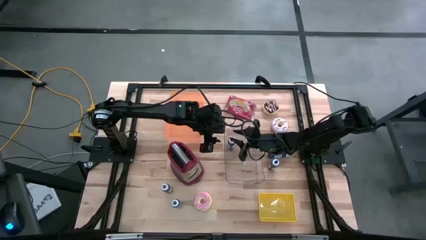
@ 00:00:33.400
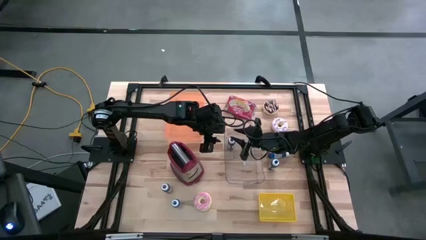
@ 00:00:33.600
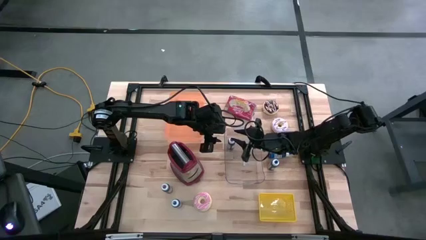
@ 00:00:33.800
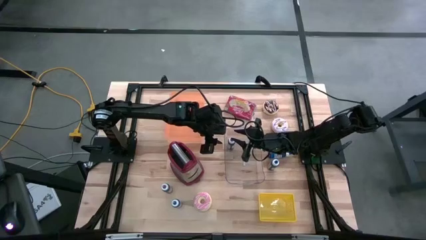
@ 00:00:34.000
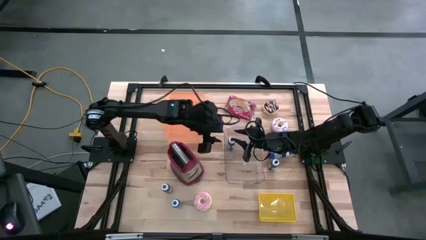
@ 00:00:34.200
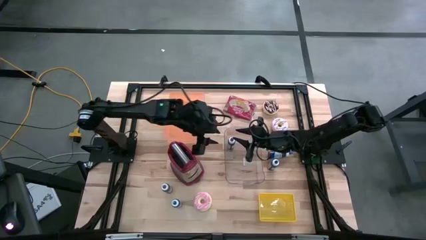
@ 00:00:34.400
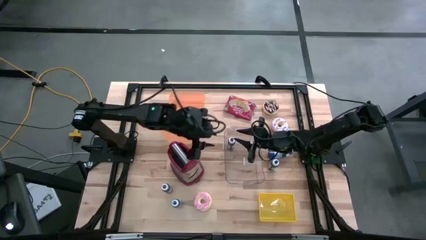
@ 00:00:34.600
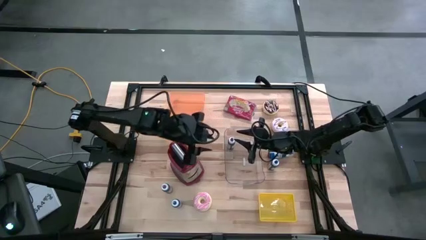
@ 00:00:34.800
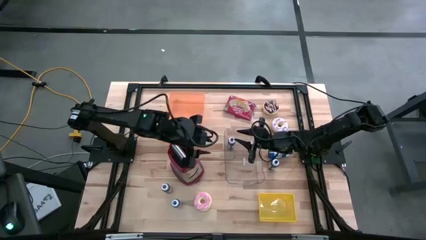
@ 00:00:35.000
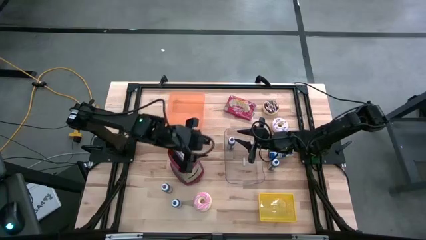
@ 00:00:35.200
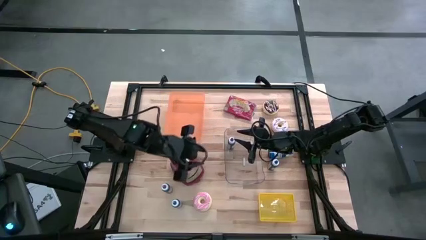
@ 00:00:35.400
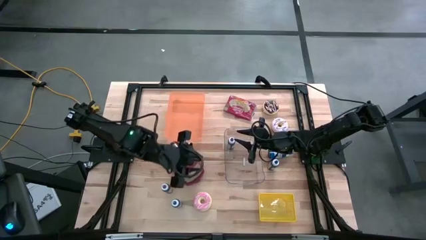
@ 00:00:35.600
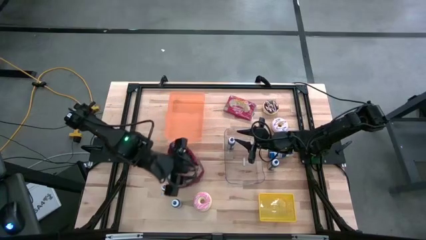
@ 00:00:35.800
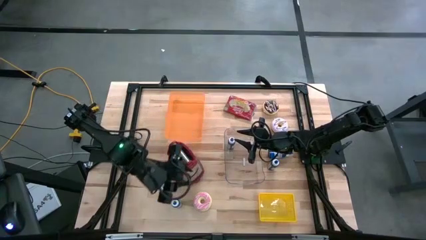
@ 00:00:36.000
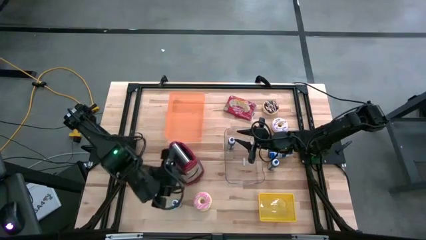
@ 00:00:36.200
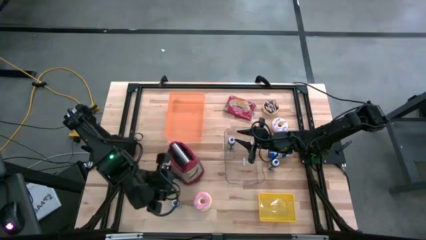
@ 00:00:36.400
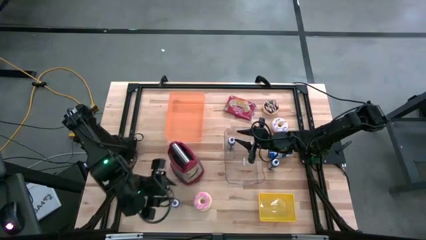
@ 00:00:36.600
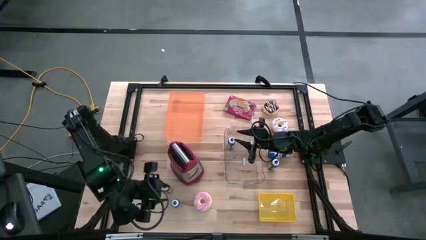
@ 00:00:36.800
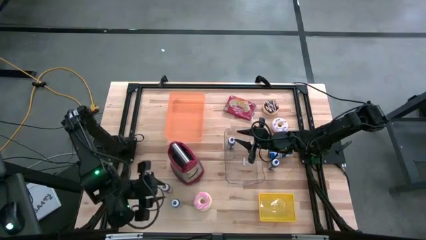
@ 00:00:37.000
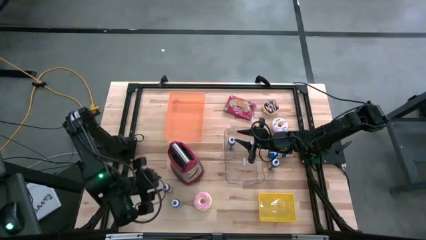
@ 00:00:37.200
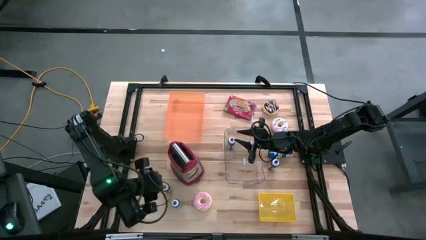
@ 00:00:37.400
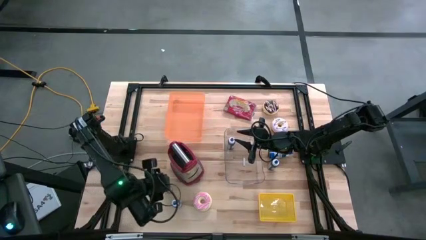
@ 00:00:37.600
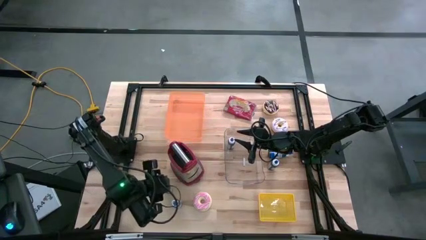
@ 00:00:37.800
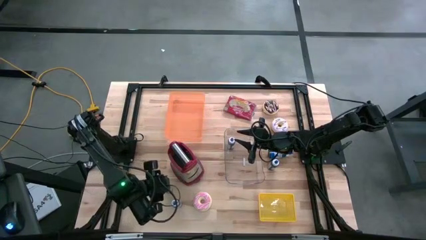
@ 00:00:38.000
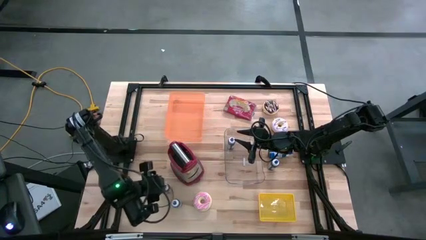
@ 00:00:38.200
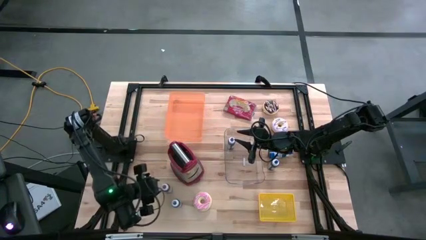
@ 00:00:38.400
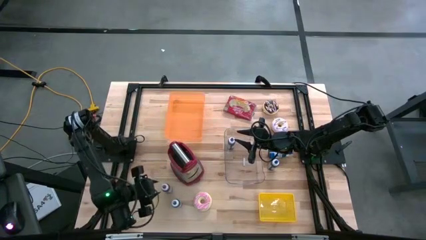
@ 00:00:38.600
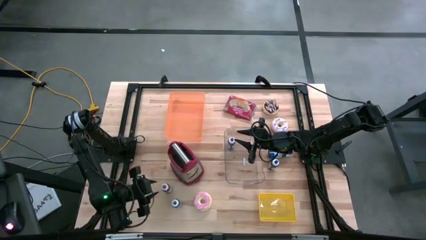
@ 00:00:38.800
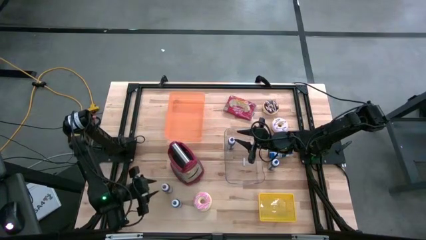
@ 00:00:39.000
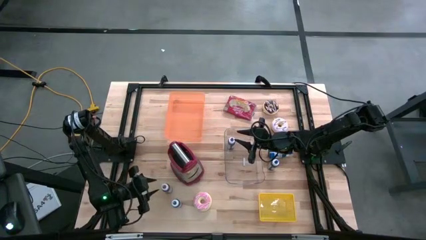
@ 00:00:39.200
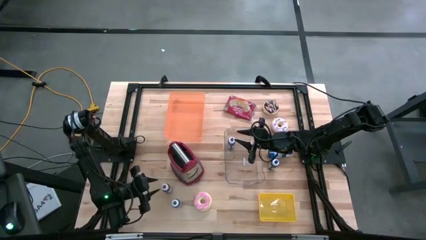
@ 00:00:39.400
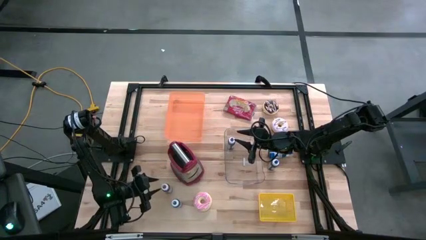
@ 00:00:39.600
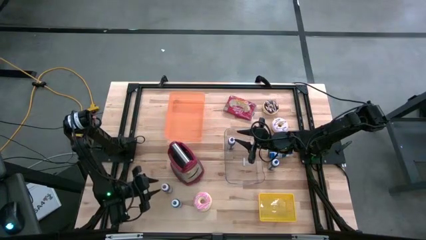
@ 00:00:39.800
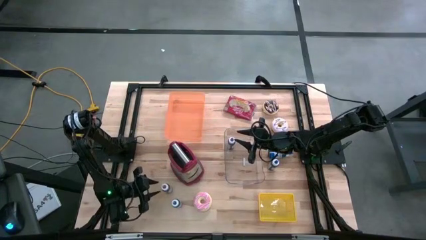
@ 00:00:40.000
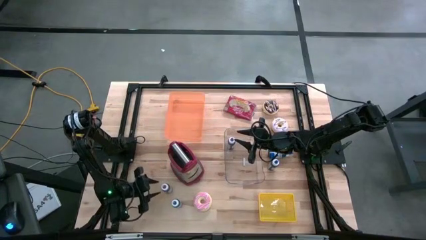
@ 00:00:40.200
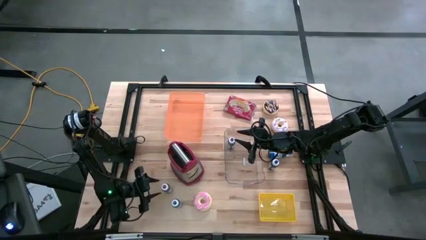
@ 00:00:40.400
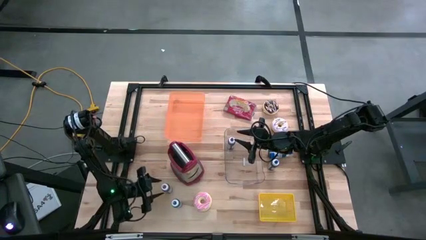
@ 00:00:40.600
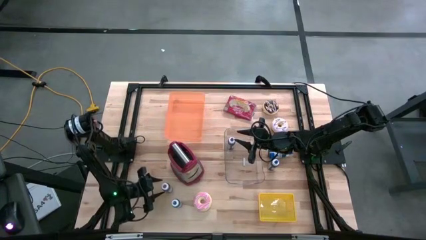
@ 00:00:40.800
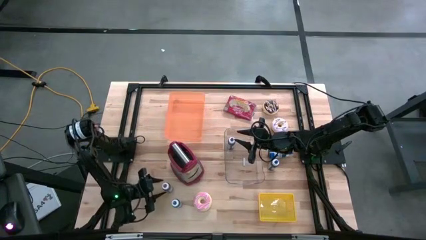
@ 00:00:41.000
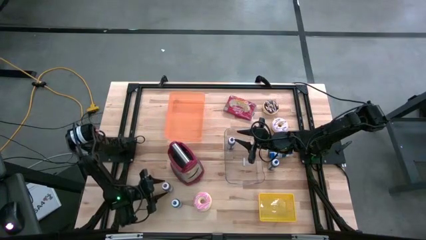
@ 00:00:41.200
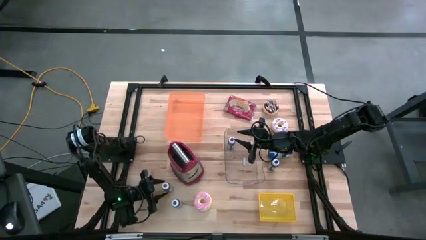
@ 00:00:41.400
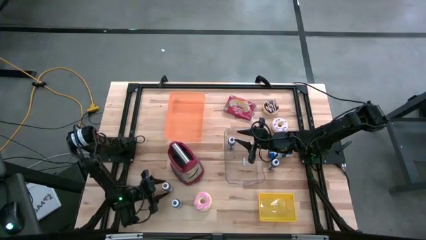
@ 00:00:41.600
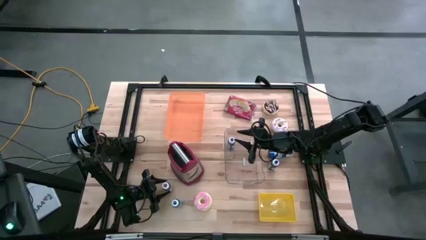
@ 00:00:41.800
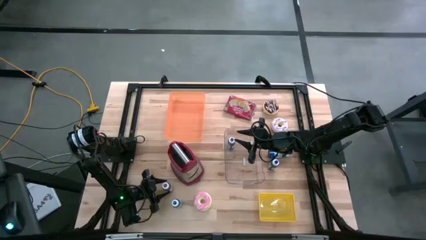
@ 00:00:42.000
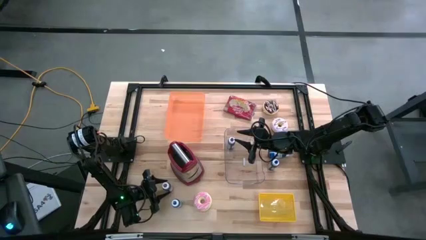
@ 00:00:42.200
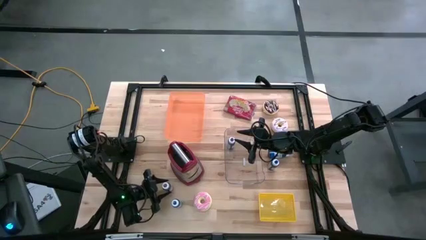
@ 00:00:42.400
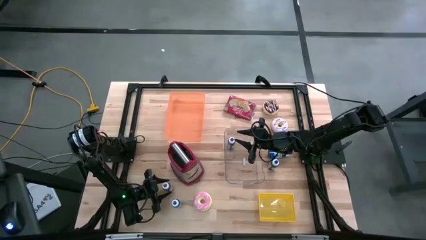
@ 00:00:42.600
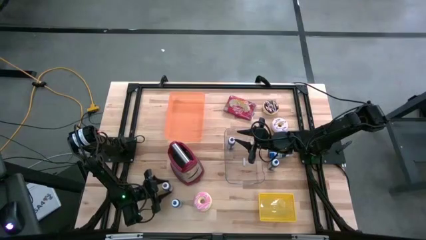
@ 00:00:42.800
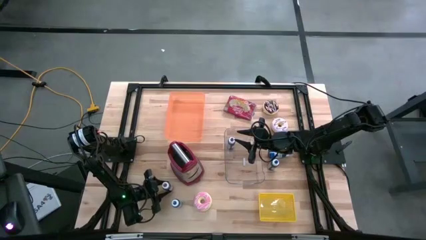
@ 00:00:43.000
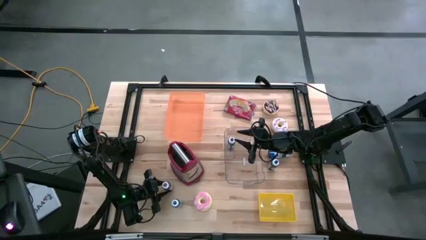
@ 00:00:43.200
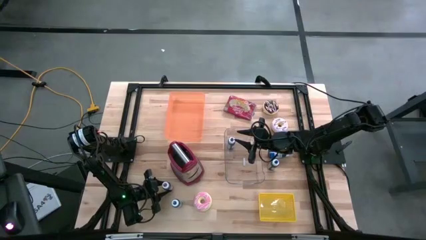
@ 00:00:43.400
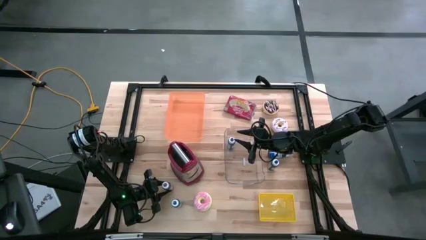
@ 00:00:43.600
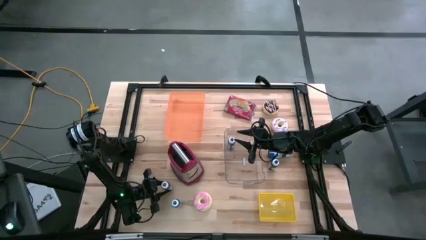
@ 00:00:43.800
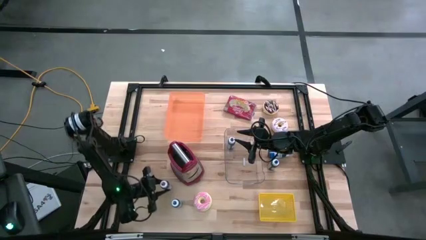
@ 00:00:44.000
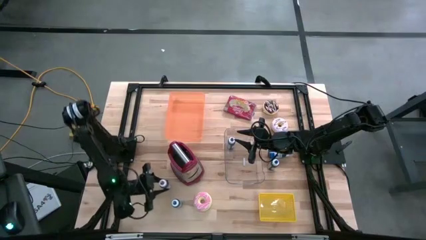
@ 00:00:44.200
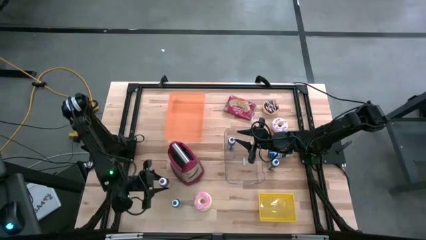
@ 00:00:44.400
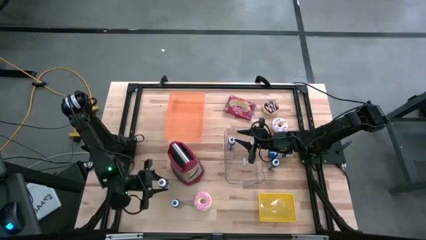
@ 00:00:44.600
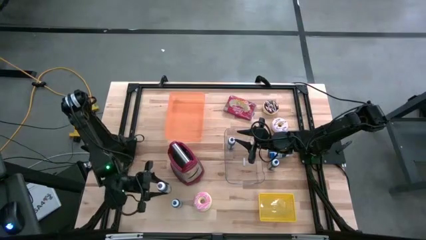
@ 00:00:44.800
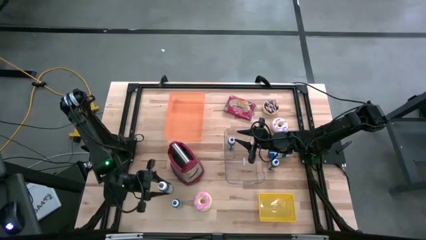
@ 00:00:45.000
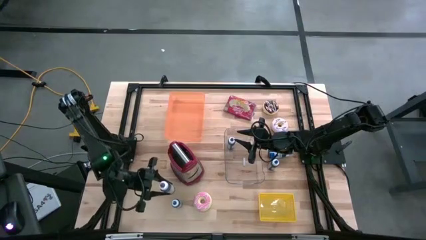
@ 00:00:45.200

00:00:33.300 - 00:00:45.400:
Task: Pick & Place Food Item
Put the purple food coloring bottle into the transparent bin
